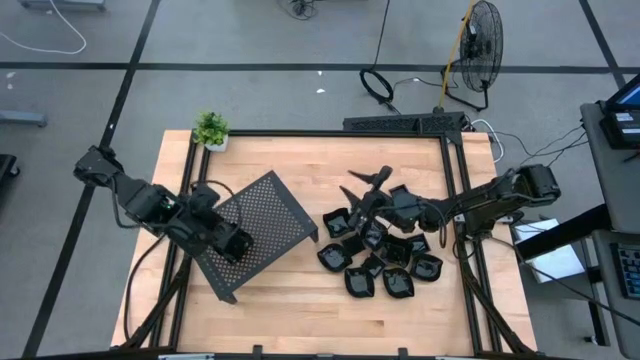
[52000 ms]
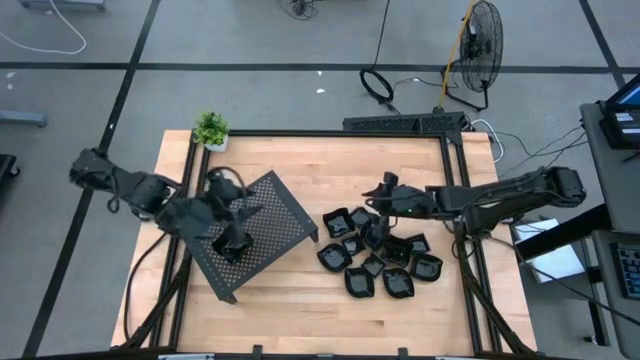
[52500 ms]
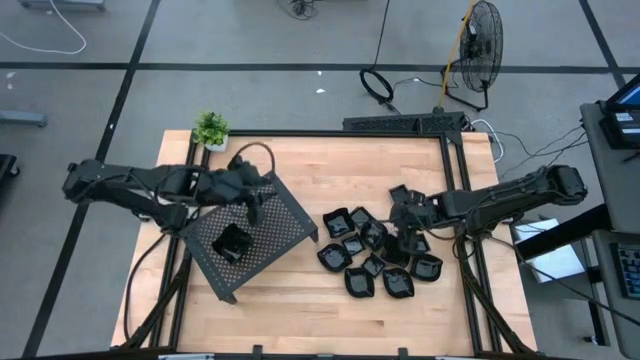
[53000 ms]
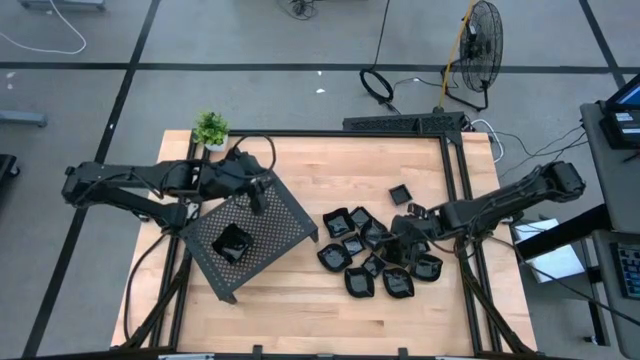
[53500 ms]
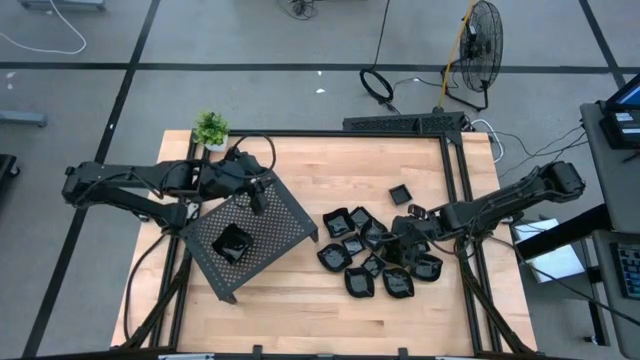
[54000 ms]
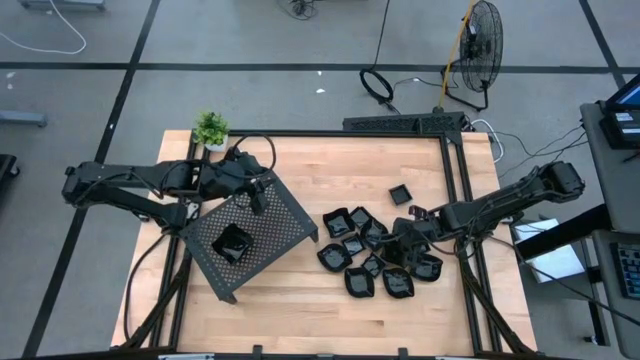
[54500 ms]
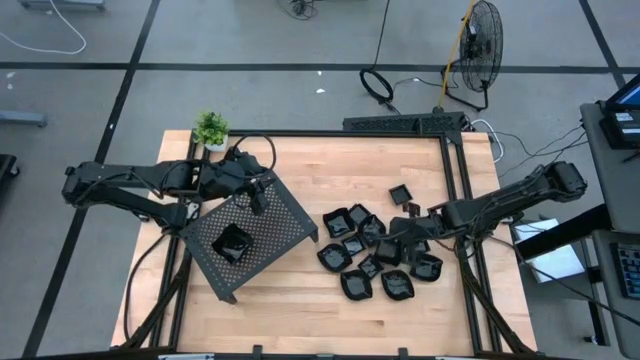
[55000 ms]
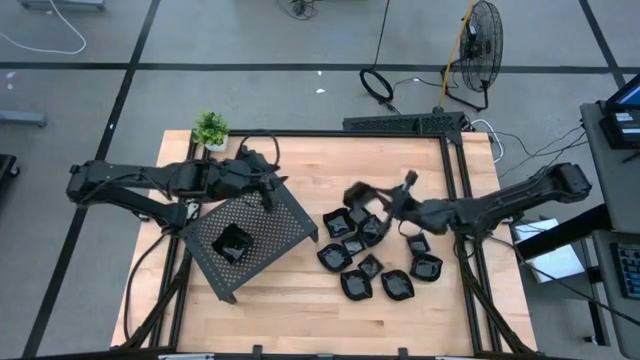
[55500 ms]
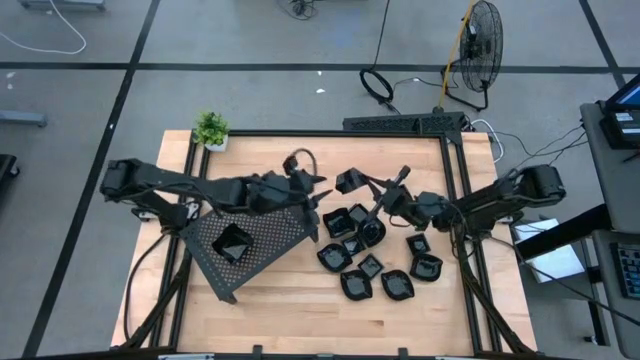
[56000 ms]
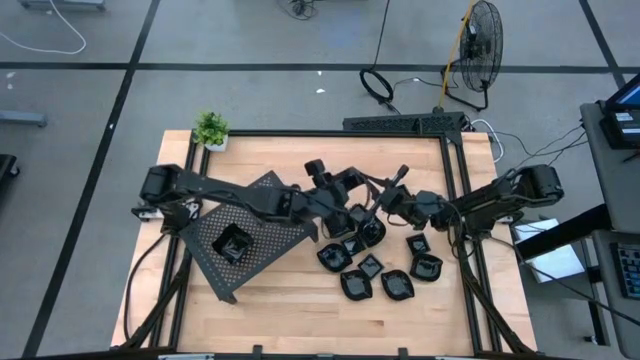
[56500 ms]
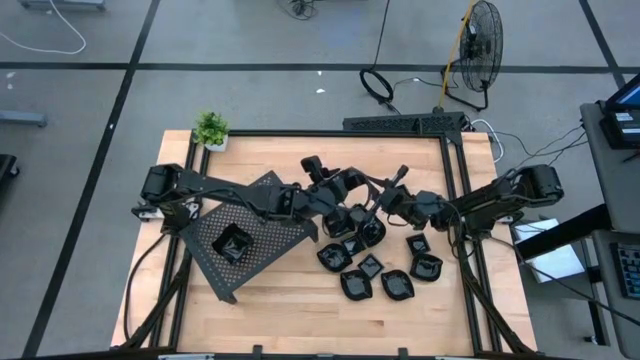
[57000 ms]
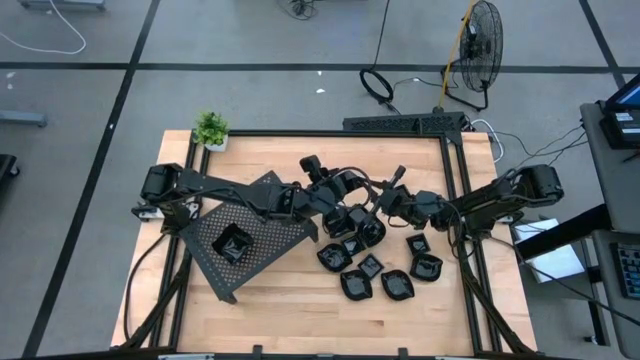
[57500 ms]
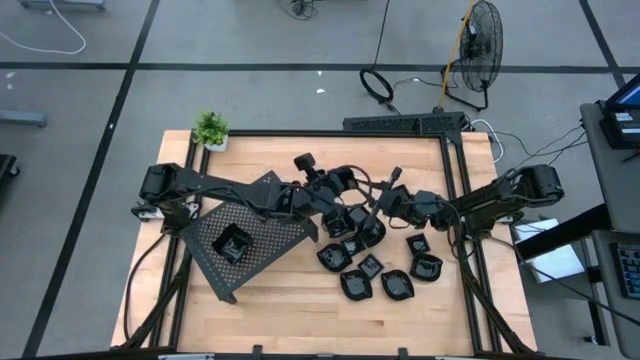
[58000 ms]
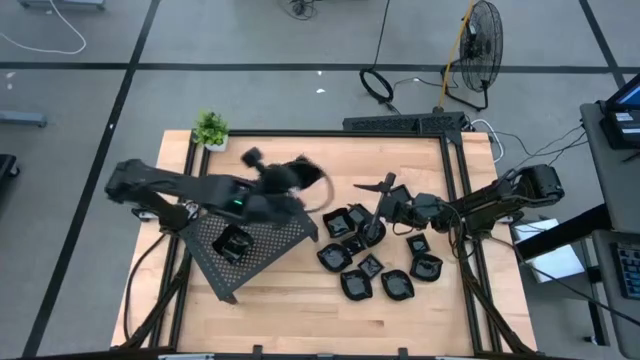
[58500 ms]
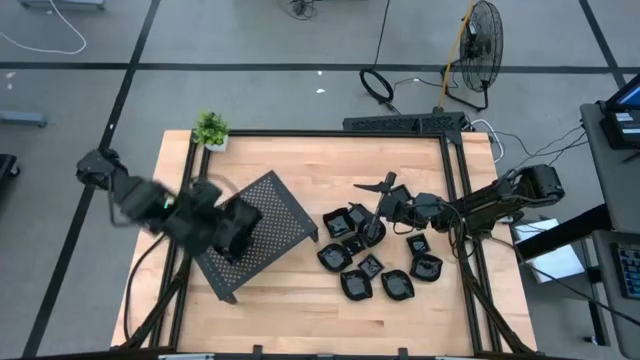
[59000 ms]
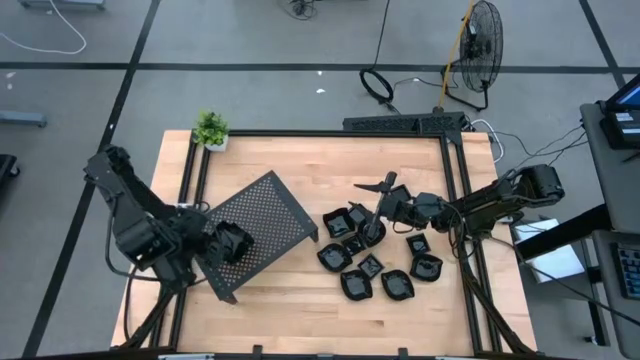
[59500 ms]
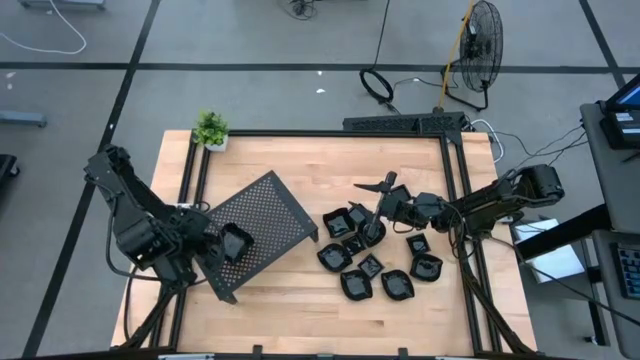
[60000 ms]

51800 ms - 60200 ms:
Task: Pick & Place Mini shaped plates
Stack the distorted square plate on top of the distorted square plate on the shelf

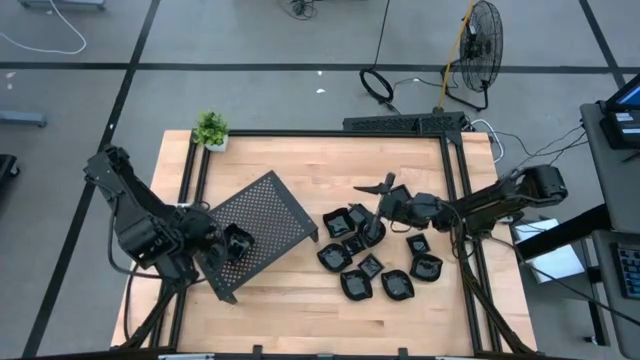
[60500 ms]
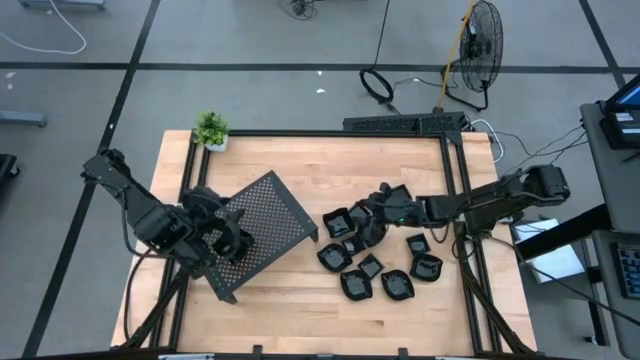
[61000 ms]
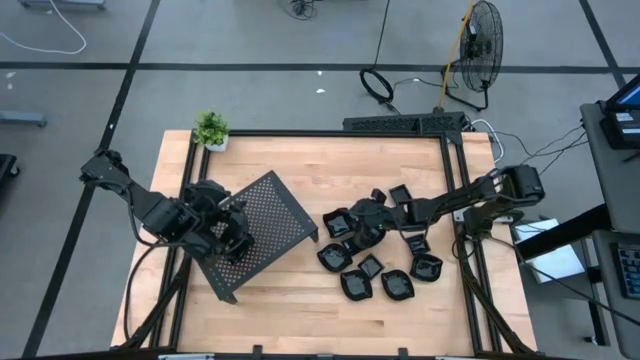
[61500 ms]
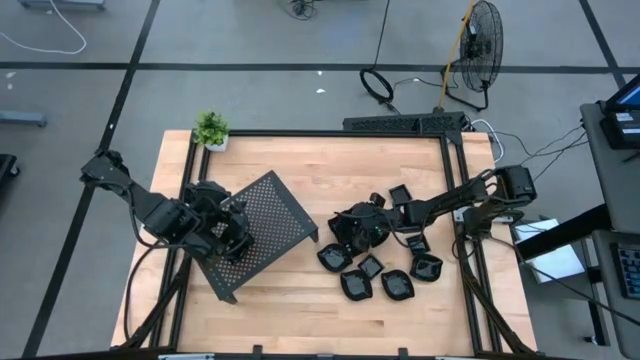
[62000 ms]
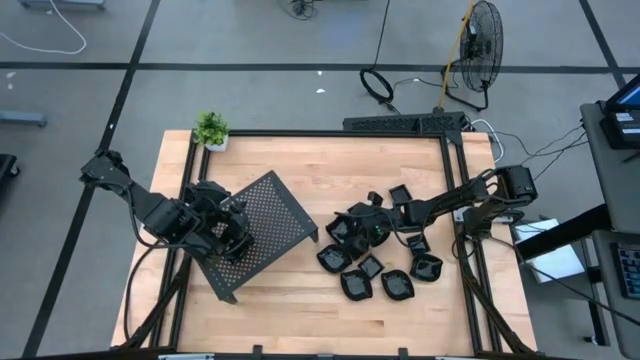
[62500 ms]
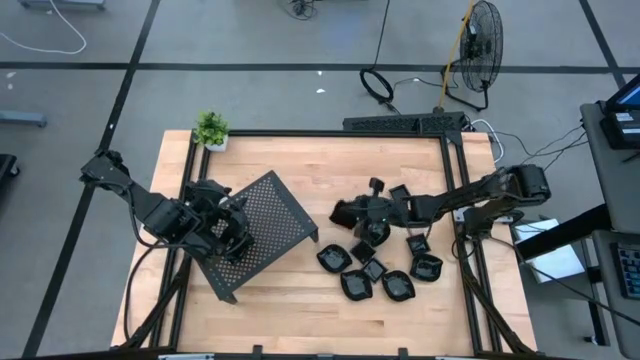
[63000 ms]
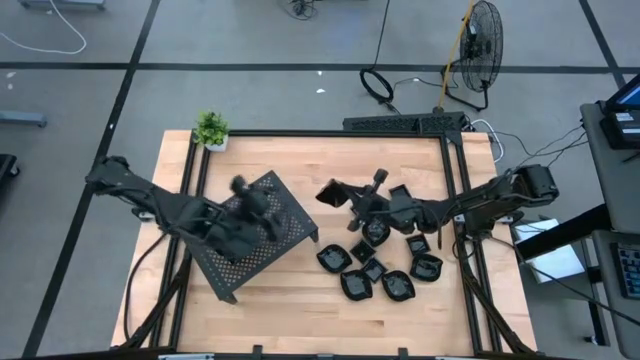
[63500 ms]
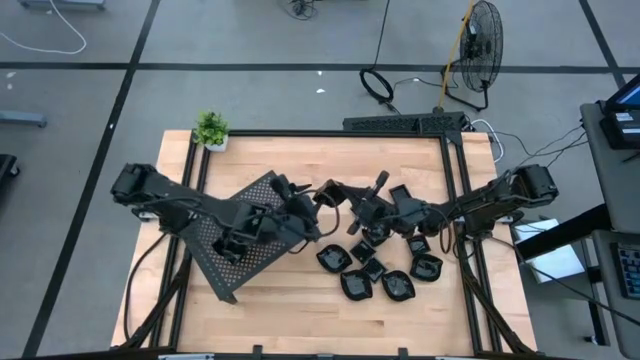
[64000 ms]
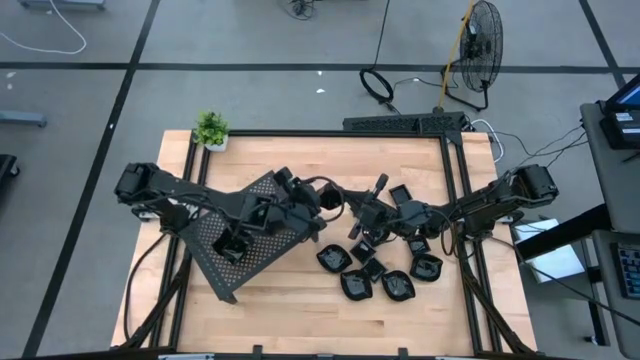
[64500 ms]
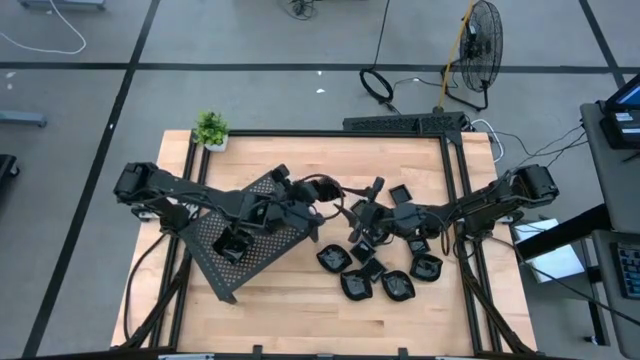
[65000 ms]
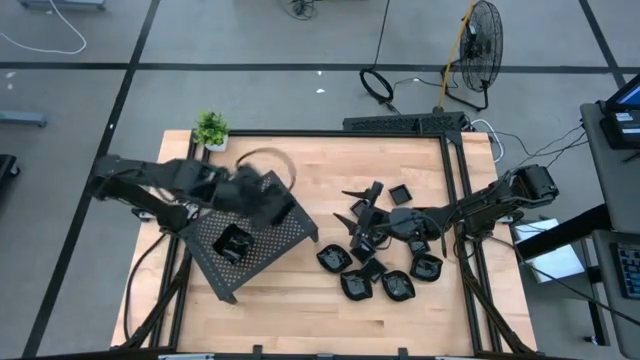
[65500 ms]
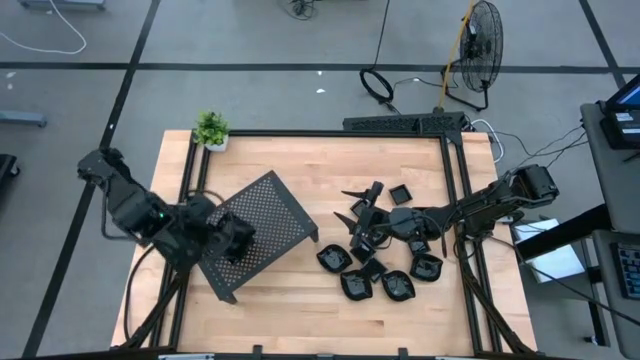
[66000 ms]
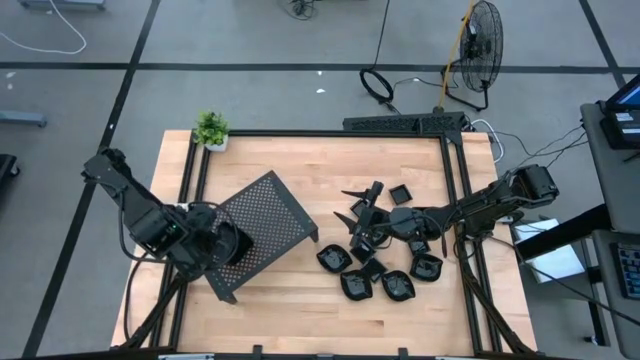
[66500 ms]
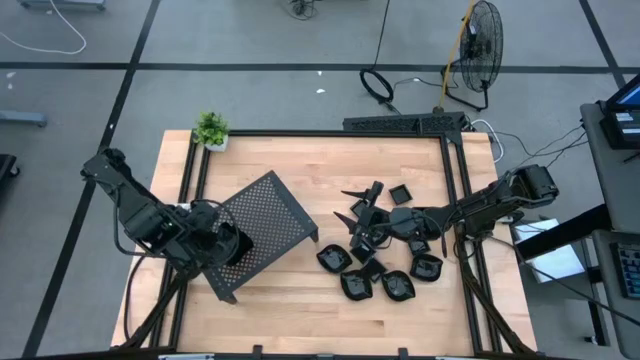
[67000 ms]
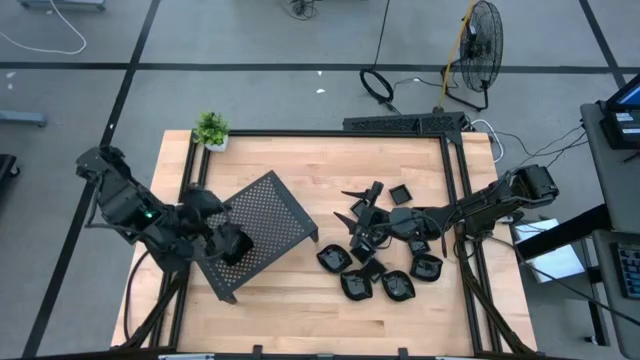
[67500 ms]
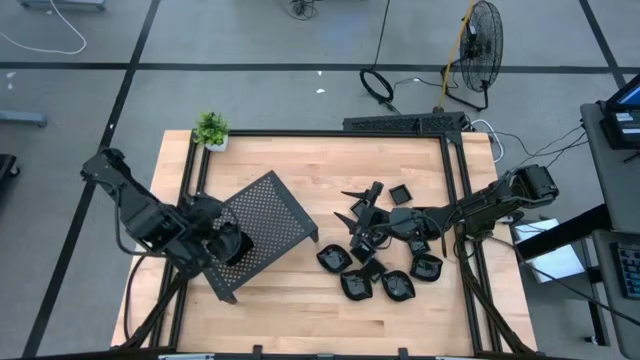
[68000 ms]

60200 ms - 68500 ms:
Stack the distorted square plate on top of the distorted square plate on the shelf

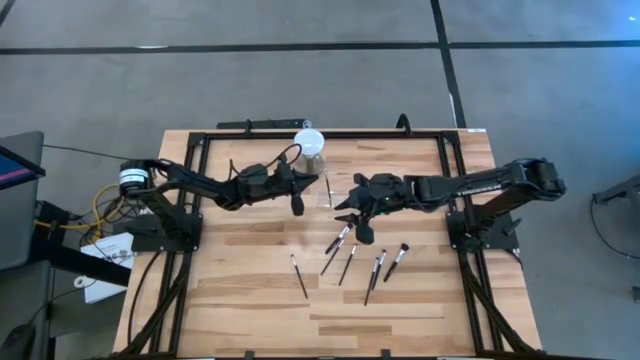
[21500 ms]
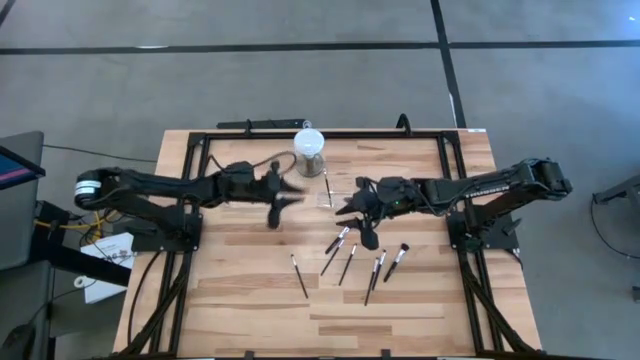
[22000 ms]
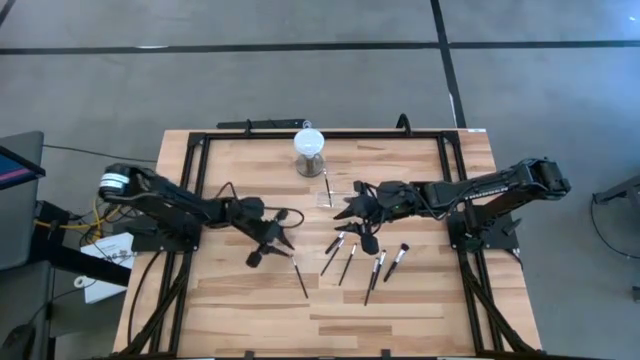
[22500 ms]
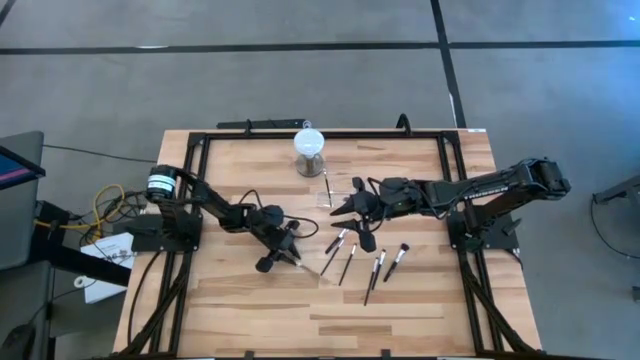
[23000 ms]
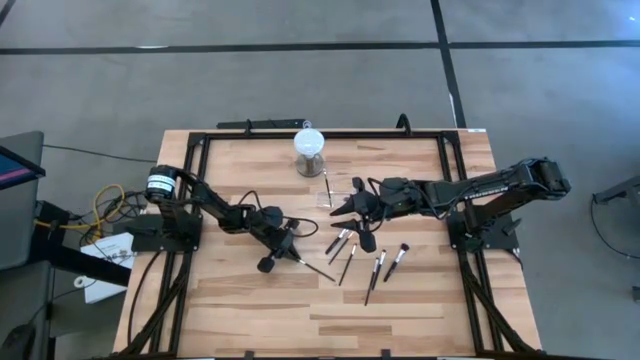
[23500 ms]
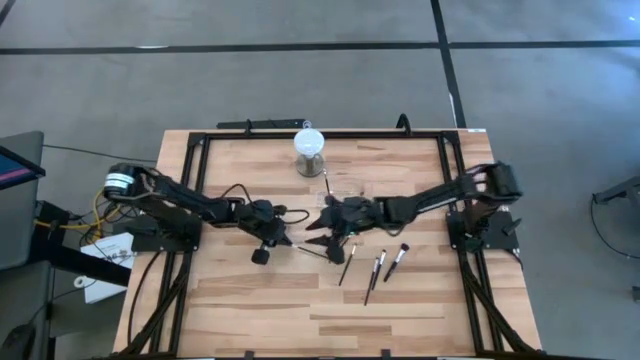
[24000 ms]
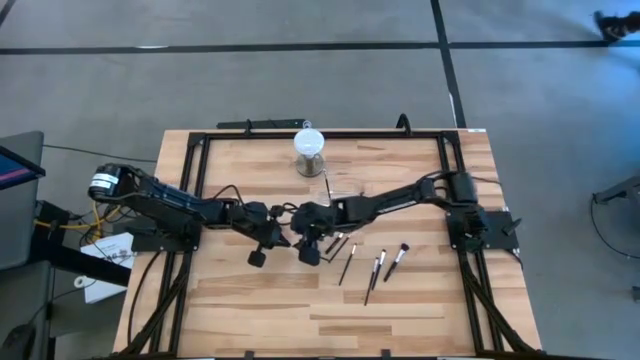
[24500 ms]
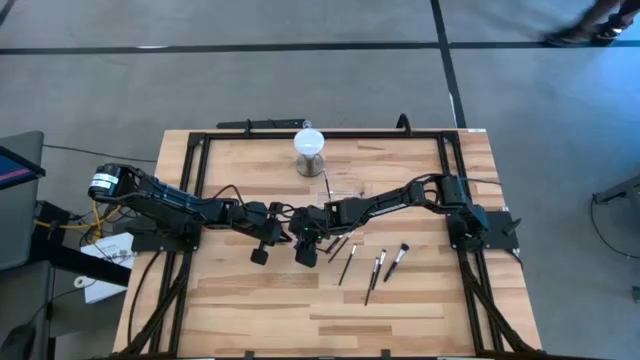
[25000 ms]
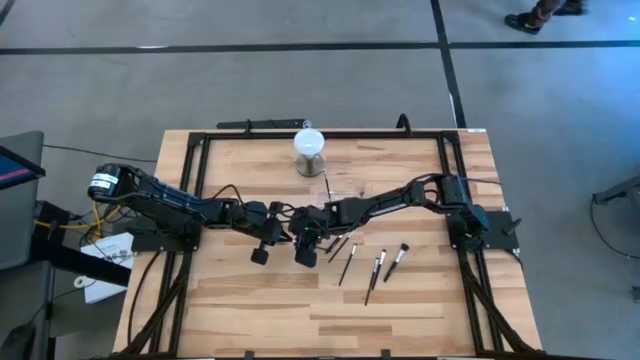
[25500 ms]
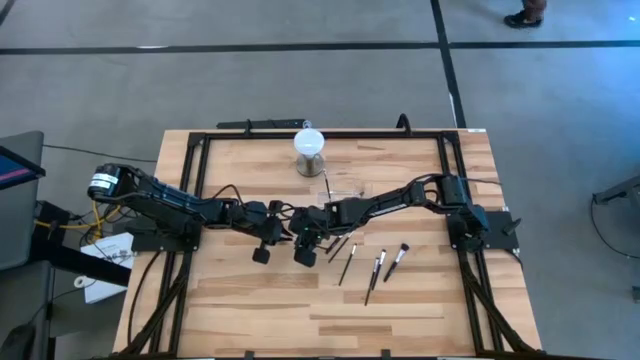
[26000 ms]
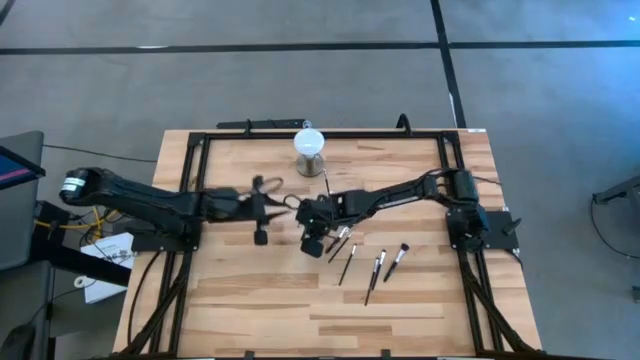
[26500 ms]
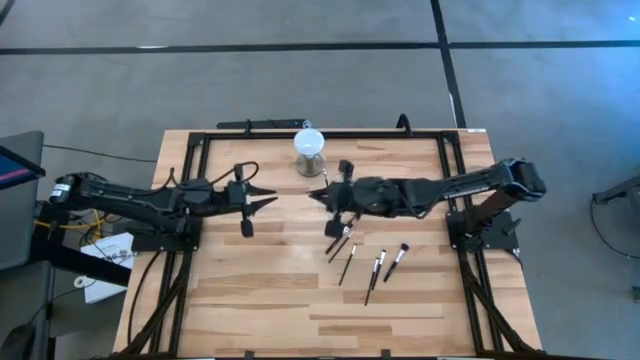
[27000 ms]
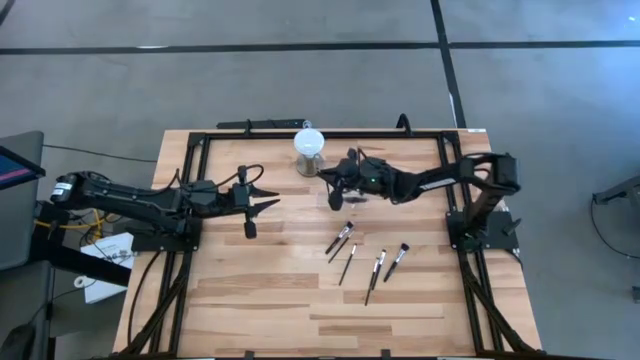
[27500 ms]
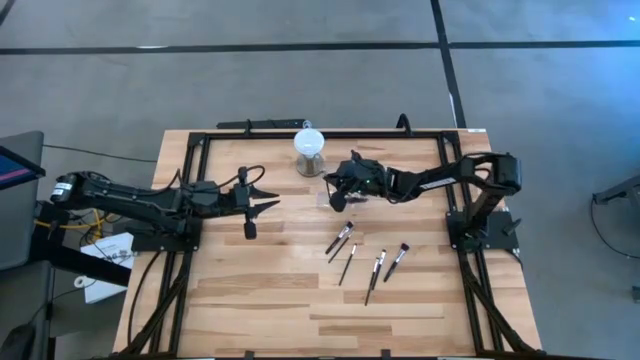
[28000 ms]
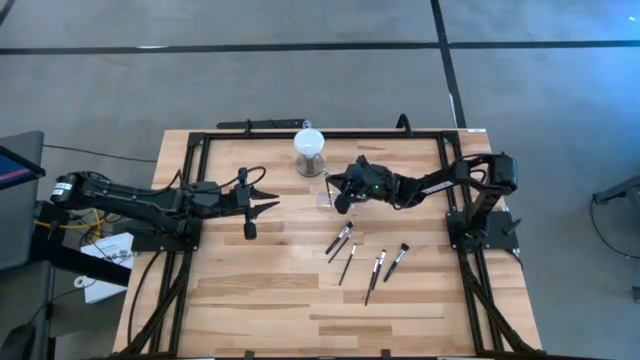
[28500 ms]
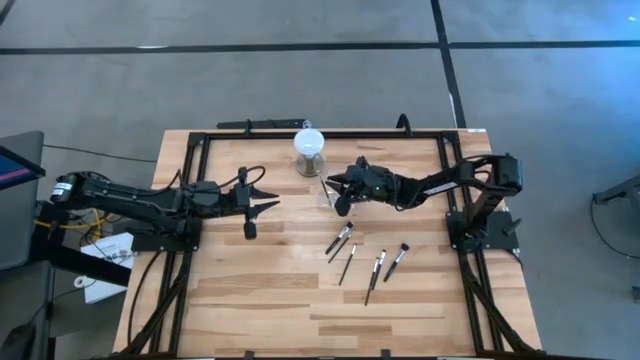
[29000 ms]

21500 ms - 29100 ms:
Task: Put items in baskets/containers
Put the black eyeshadow brush into the transparent organizer
